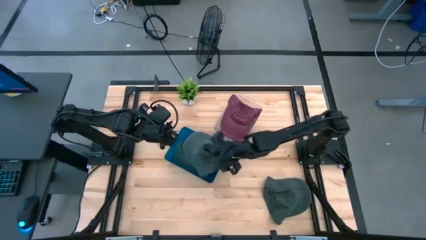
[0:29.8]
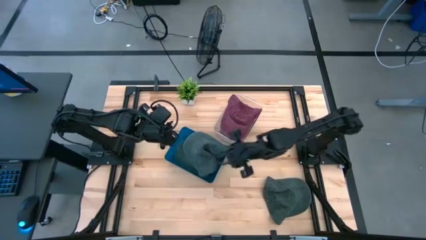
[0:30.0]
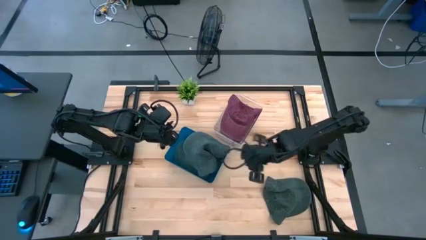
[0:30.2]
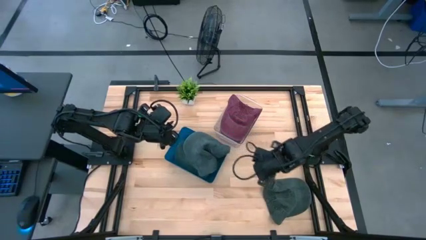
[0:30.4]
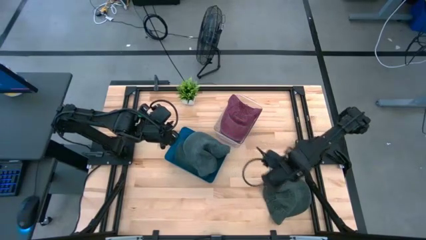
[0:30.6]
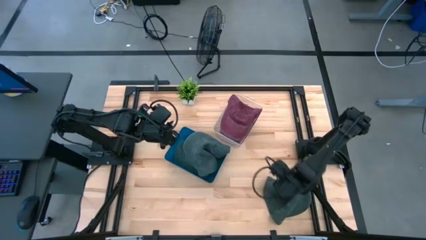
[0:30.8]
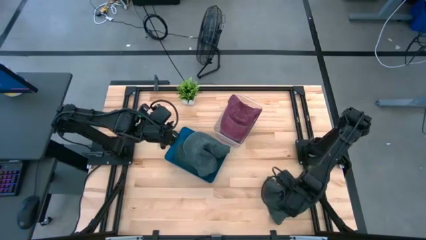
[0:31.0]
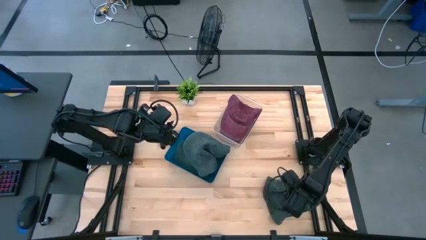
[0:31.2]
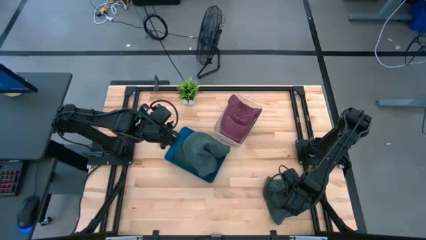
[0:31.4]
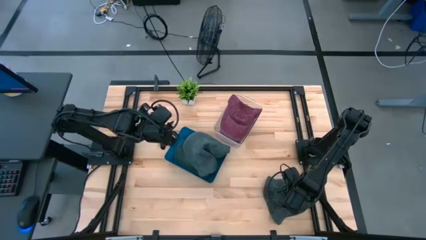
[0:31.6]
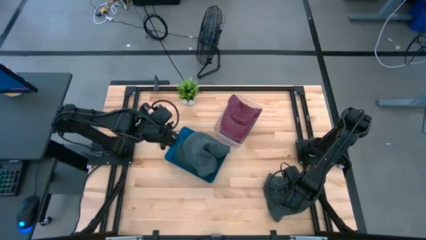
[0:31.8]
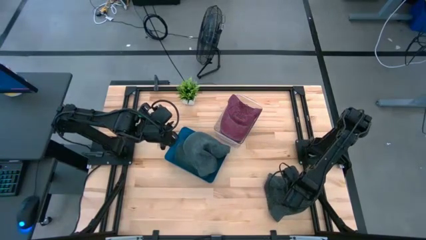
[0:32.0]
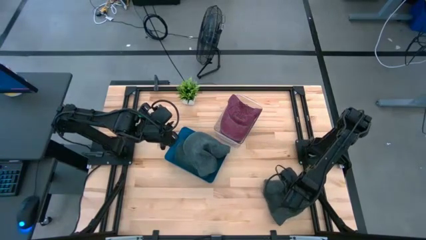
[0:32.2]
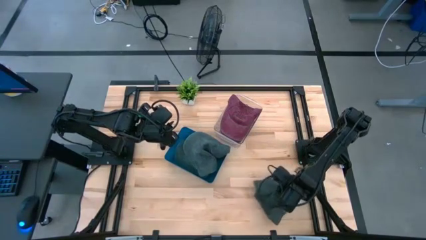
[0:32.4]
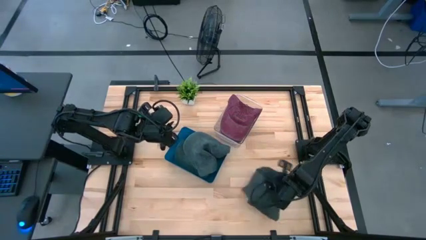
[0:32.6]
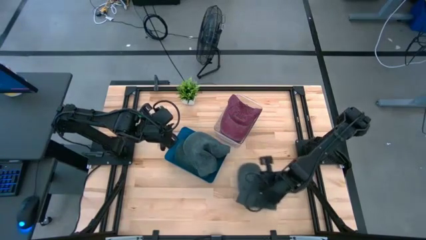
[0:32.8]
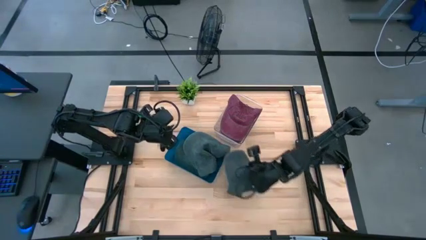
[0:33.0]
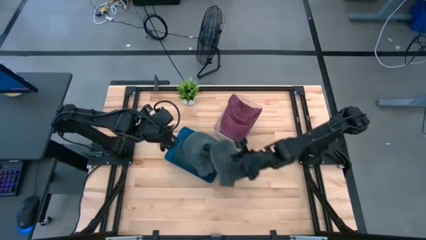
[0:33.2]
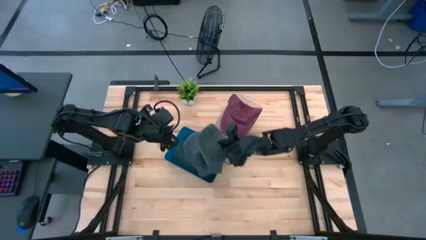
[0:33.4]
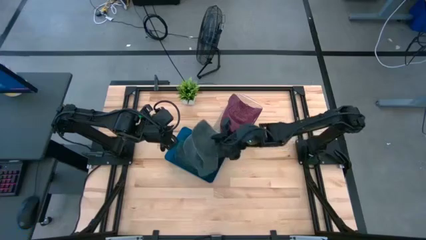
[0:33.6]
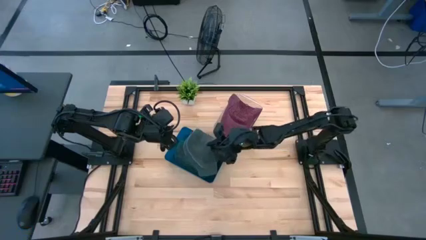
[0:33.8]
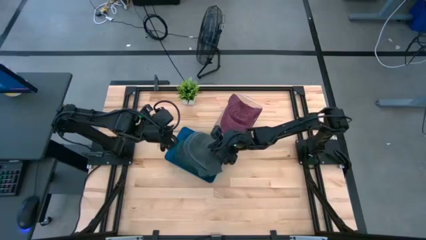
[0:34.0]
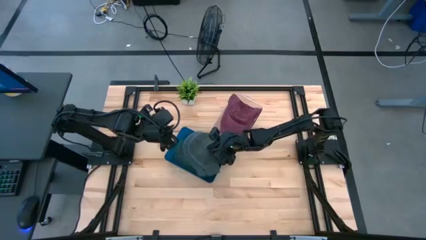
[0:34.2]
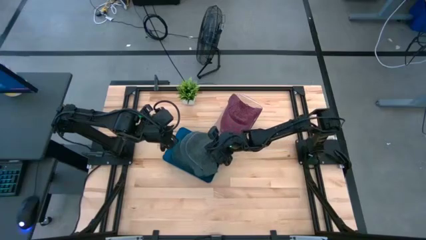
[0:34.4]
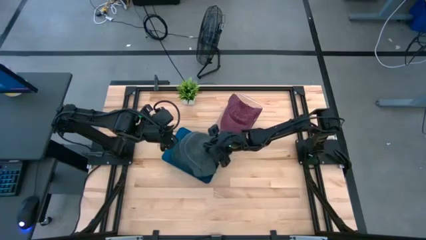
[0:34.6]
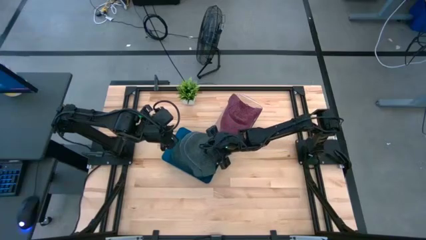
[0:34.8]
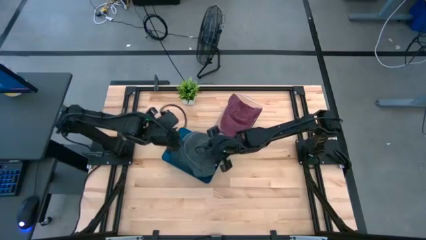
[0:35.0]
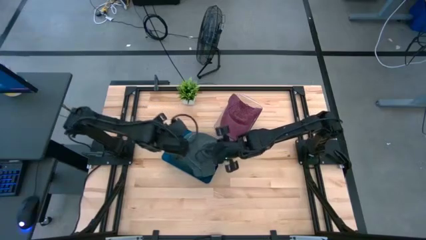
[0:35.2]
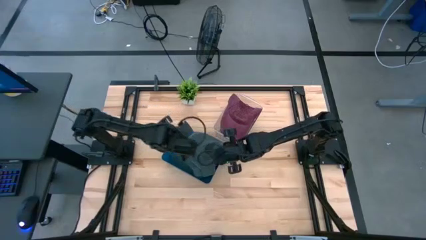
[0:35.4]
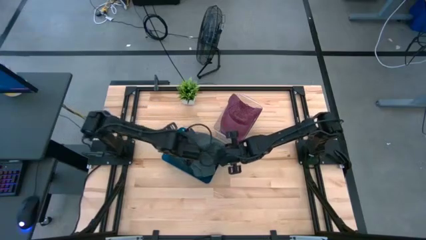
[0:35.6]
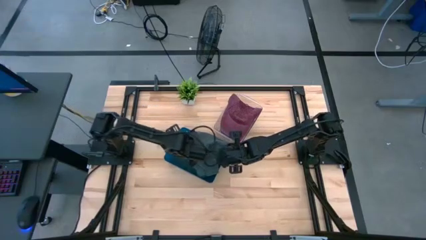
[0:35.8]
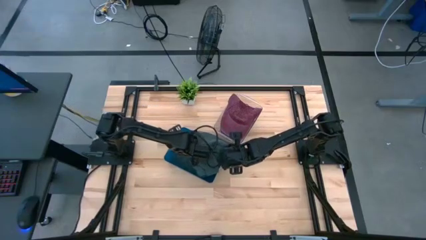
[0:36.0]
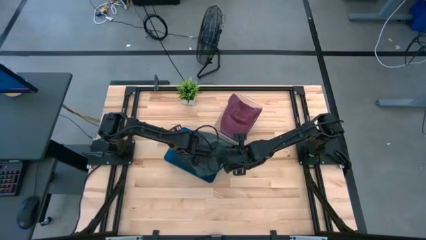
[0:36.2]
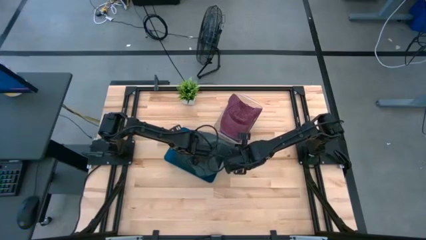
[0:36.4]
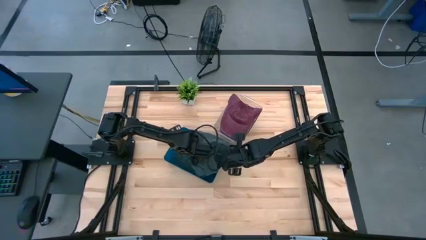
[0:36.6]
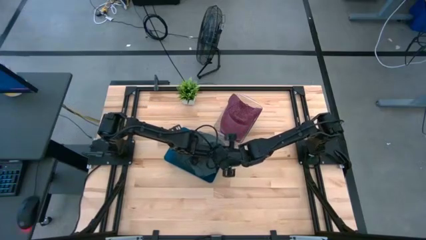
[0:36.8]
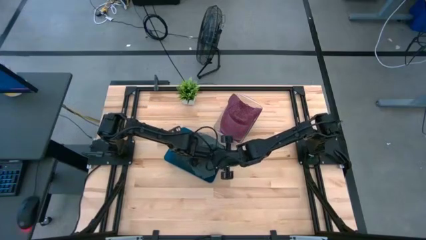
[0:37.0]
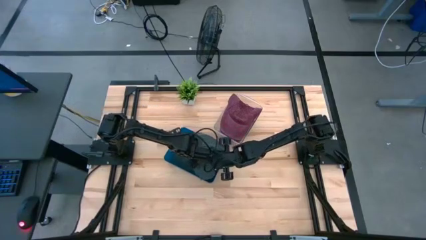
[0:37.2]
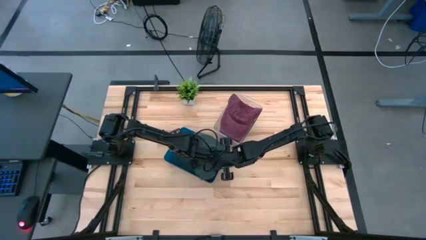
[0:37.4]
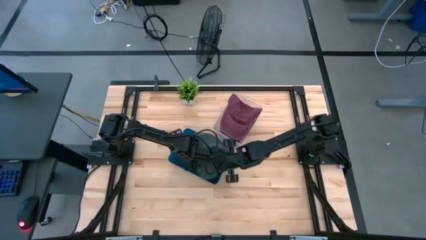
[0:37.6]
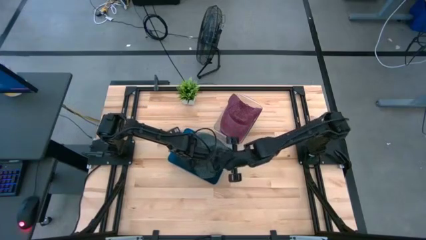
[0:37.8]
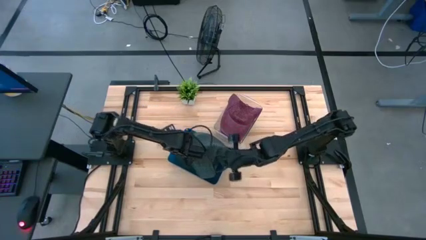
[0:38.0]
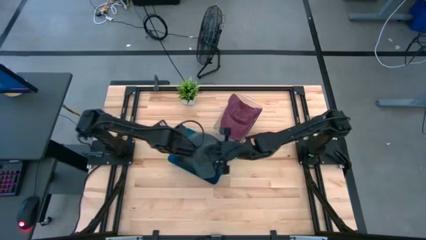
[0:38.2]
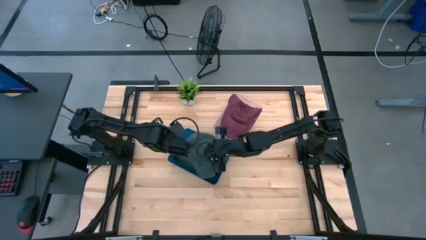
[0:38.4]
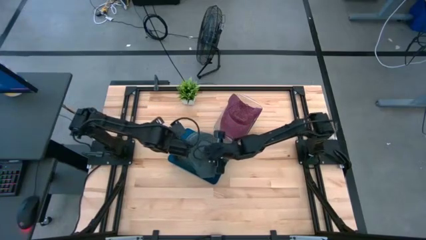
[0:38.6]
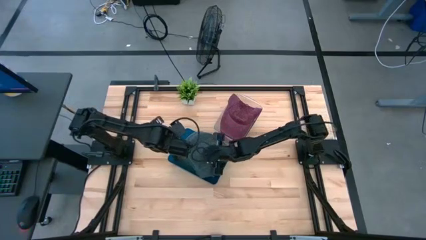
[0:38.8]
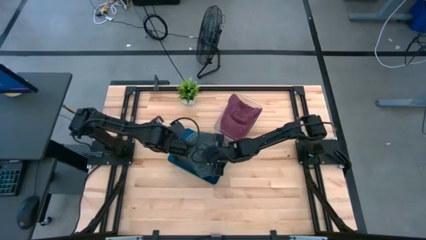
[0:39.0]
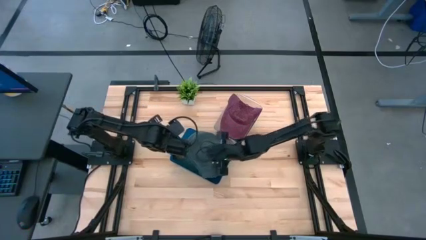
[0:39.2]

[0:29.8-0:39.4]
Task: Pick & Place hat
Put the gray cap into the blue bin

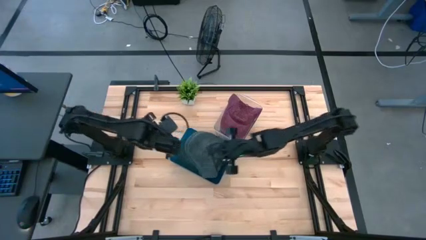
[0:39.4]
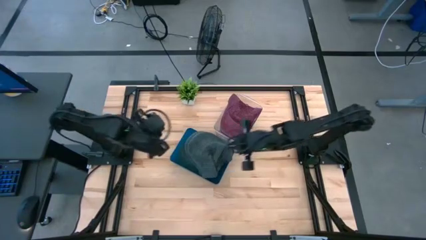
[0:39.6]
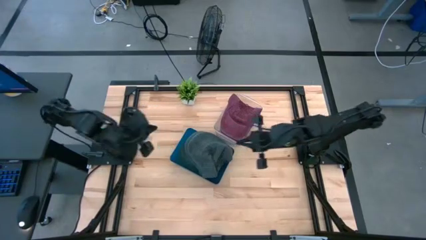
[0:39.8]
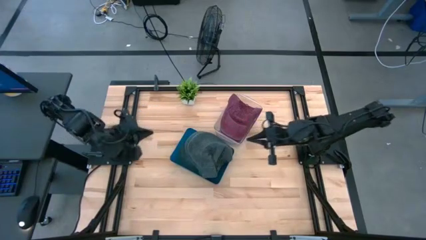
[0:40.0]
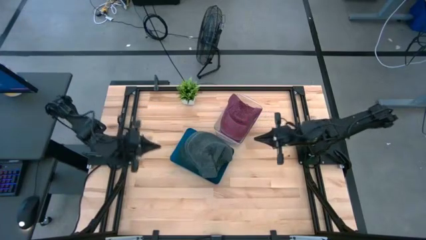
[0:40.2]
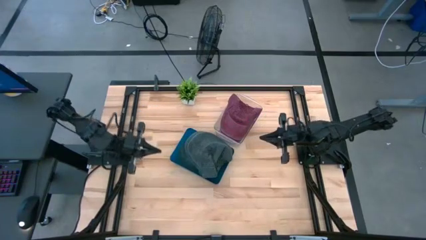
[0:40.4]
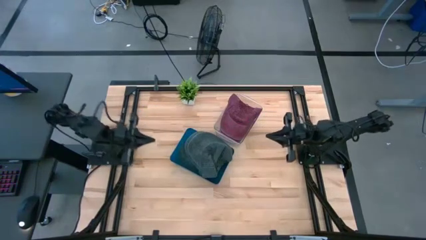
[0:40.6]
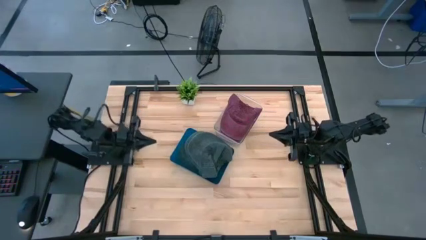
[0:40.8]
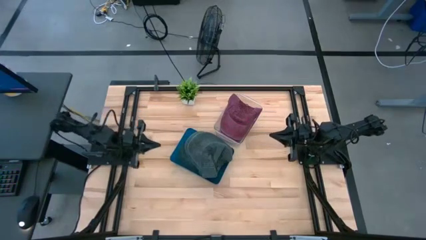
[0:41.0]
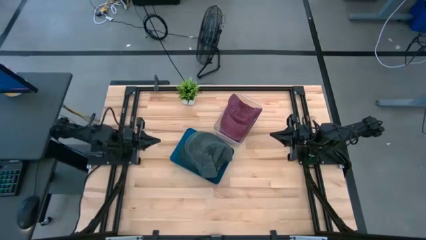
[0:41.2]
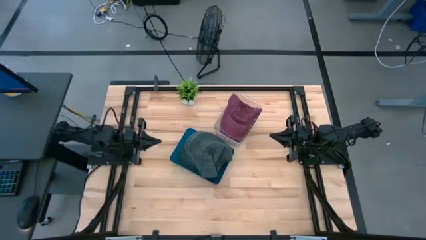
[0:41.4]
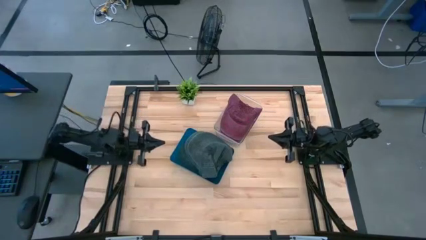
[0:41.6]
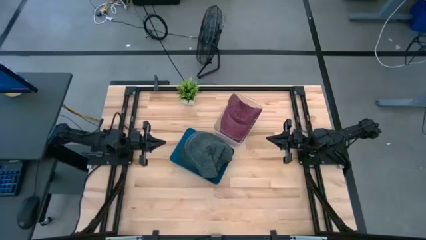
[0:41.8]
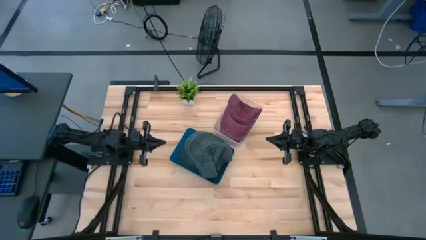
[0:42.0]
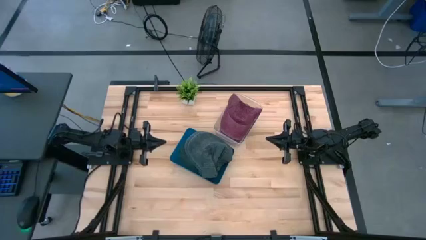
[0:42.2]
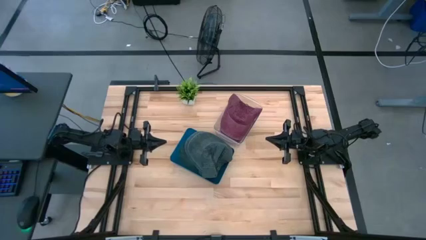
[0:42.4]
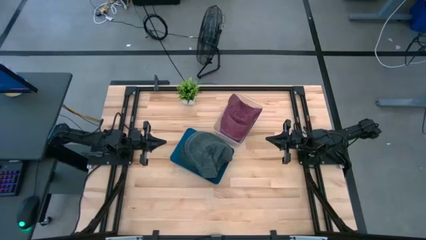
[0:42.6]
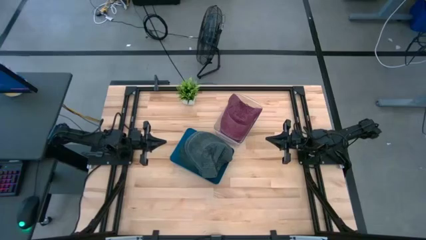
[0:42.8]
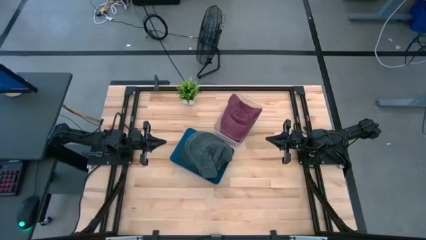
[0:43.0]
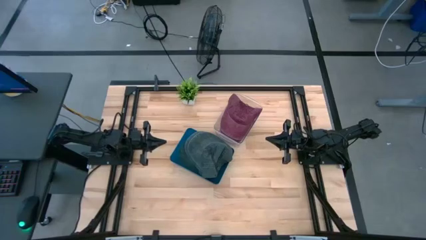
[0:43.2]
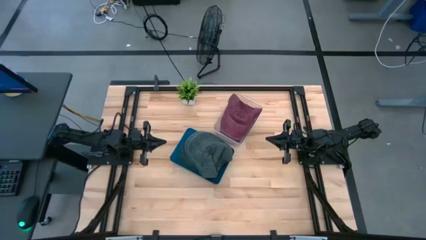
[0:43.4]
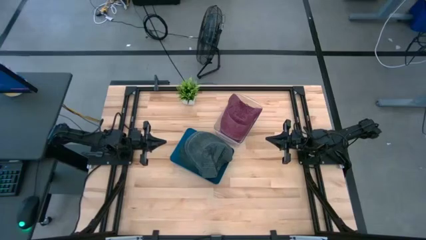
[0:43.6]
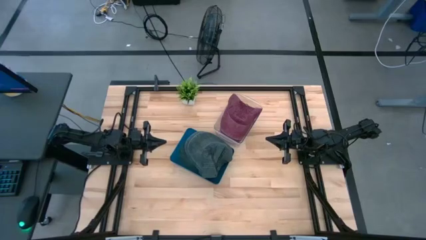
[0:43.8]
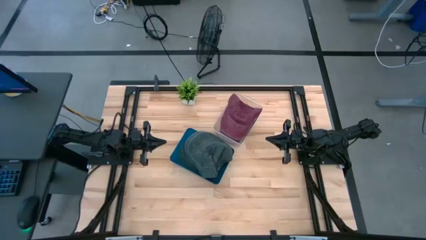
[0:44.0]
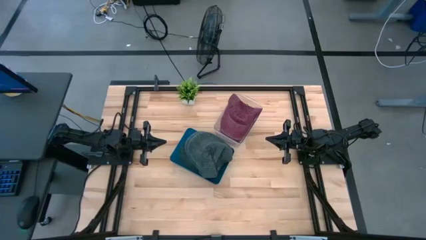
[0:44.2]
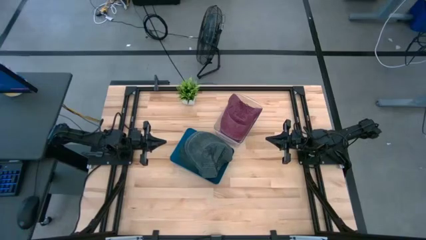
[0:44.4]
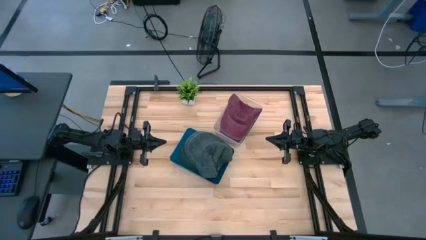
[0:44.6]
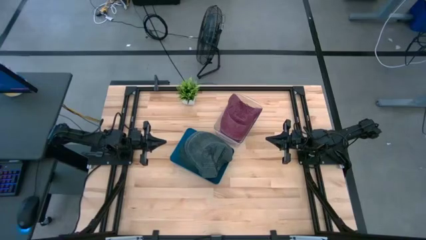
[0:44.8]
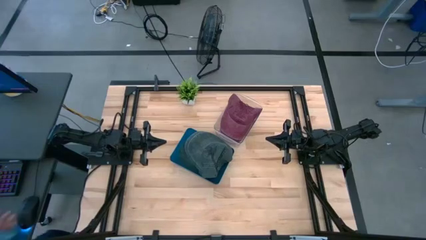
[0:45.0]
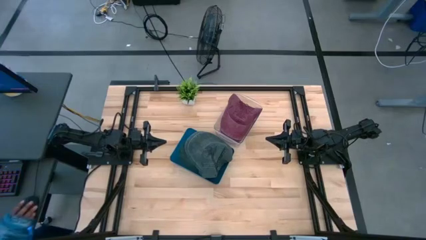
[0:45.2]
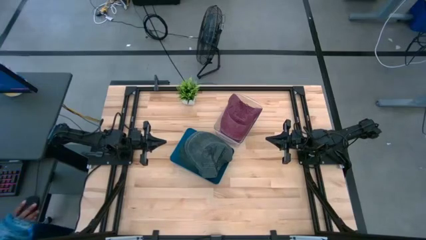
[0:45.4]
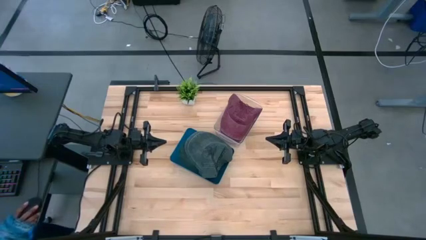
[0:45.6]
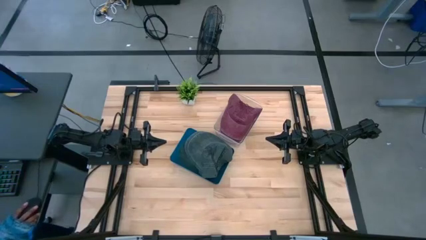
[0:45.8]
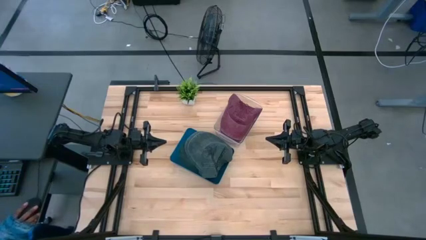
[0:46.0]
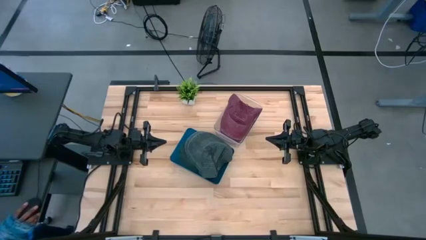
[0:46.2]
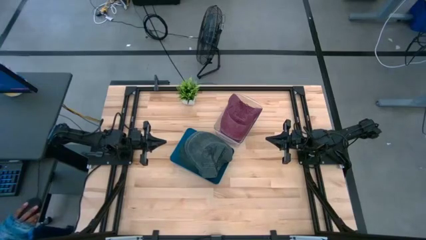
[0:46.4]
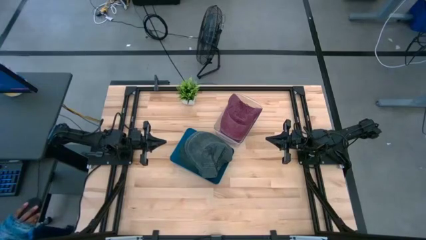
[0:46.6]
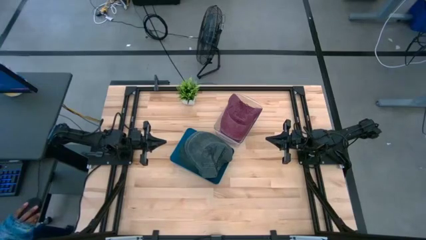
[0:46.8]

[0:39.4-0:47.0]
Return to Home Position
